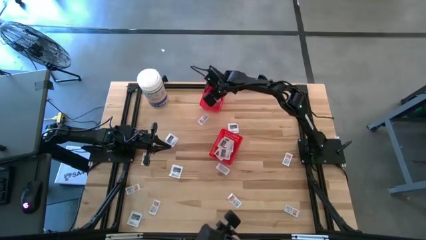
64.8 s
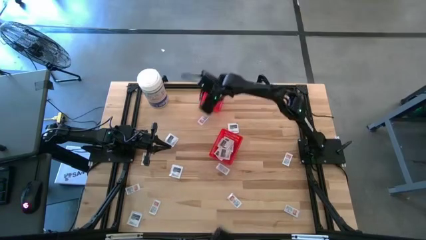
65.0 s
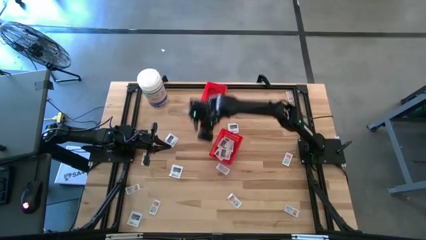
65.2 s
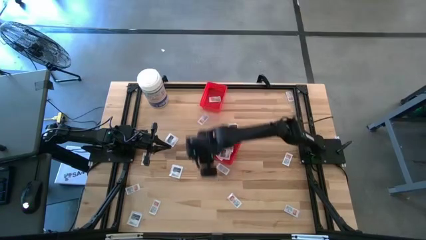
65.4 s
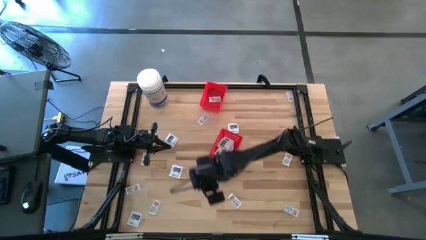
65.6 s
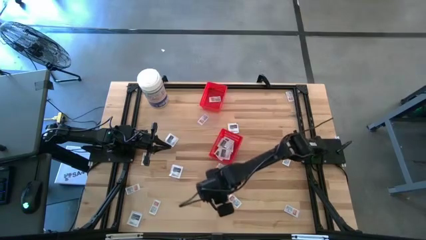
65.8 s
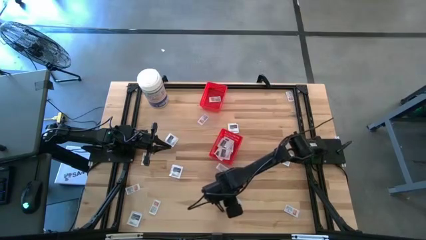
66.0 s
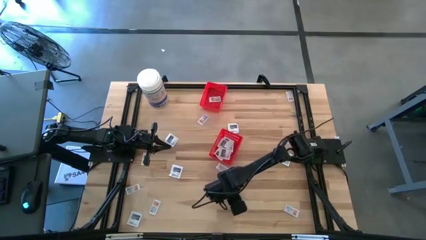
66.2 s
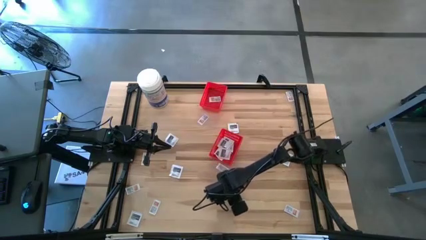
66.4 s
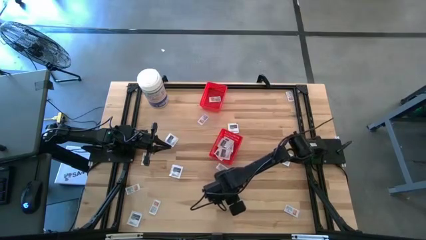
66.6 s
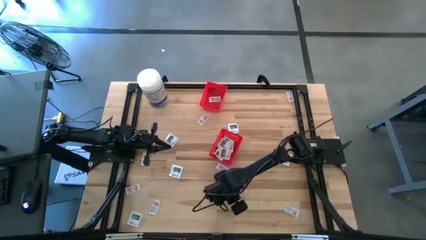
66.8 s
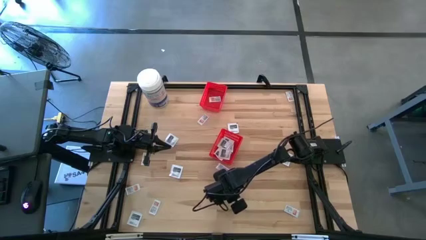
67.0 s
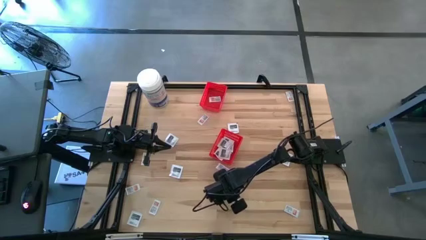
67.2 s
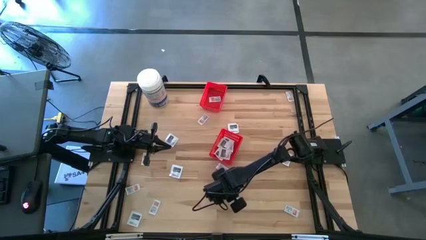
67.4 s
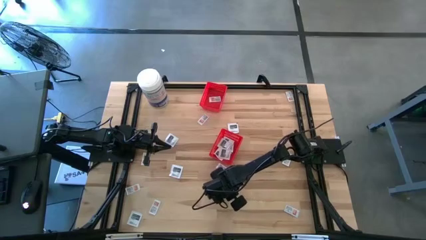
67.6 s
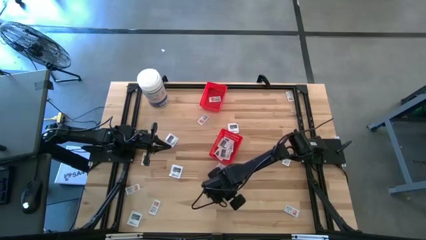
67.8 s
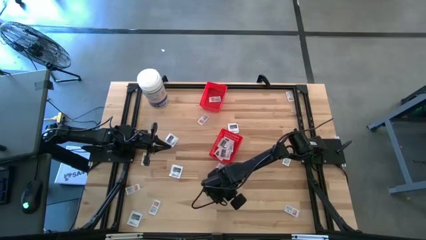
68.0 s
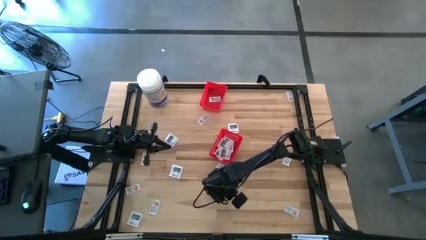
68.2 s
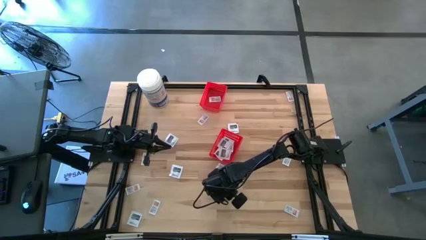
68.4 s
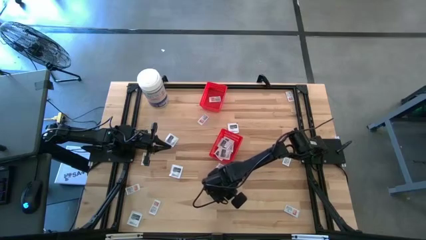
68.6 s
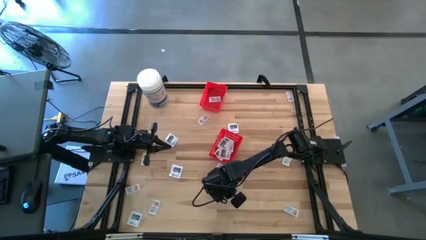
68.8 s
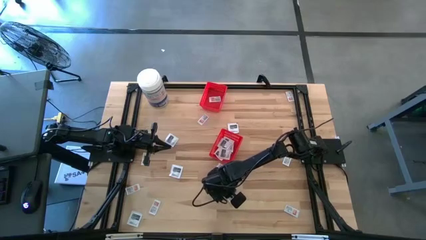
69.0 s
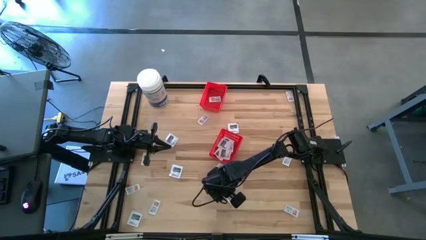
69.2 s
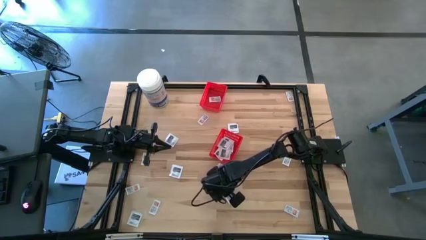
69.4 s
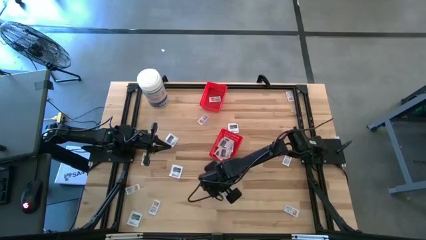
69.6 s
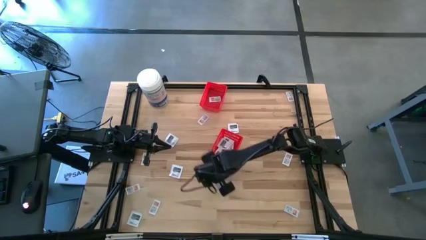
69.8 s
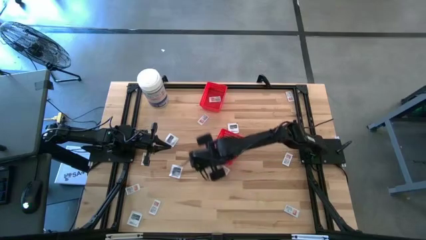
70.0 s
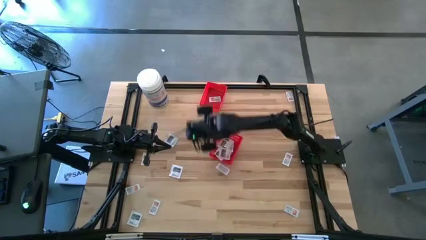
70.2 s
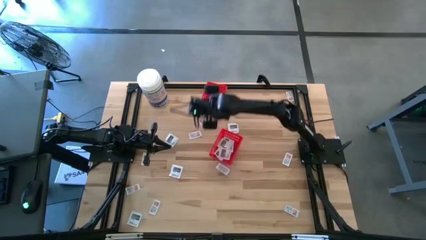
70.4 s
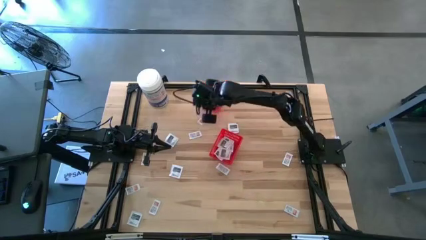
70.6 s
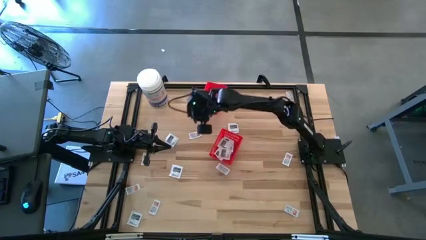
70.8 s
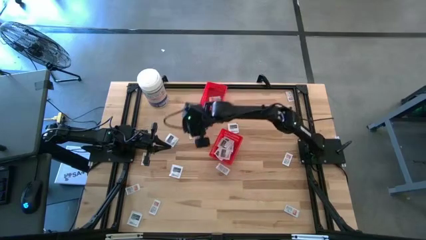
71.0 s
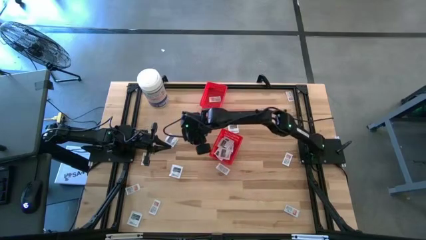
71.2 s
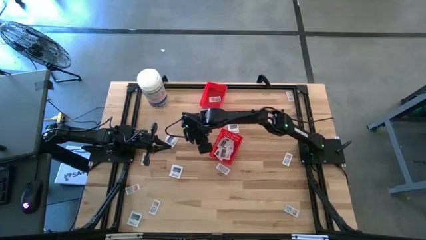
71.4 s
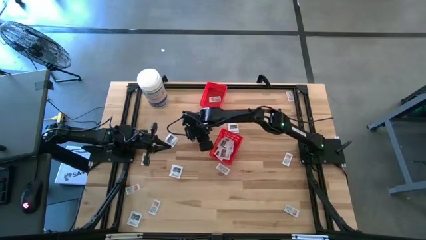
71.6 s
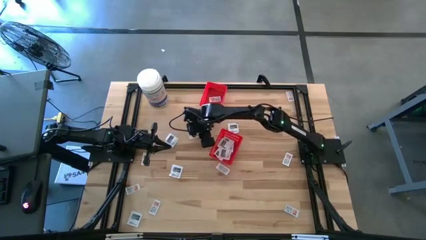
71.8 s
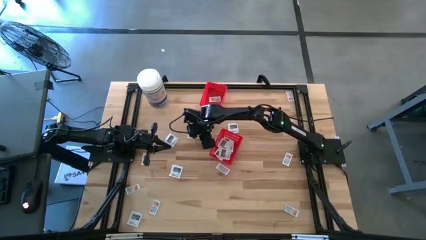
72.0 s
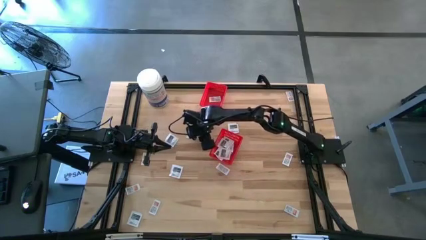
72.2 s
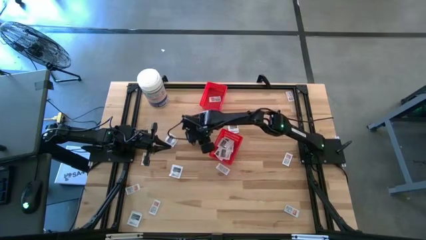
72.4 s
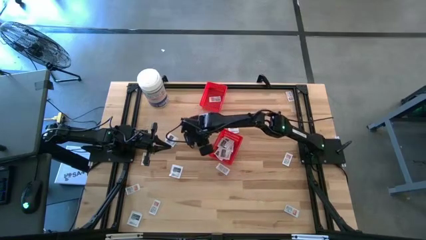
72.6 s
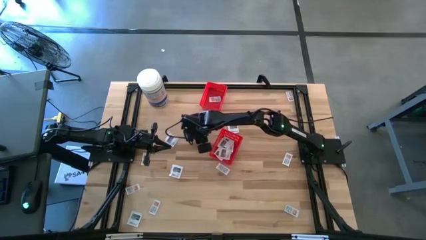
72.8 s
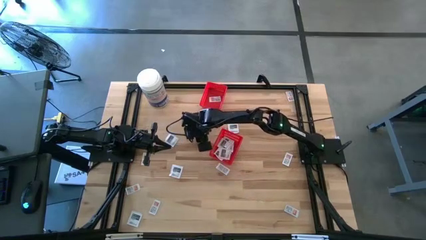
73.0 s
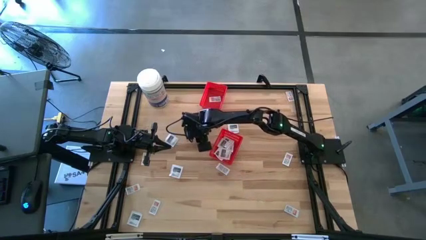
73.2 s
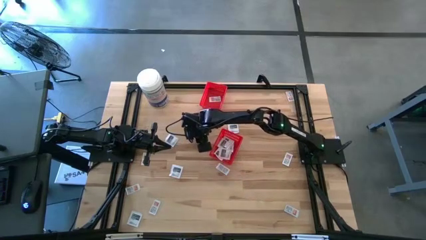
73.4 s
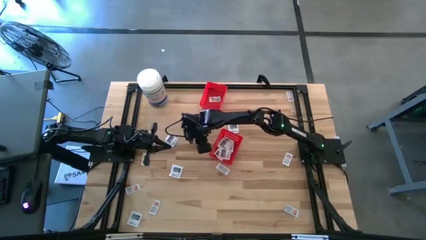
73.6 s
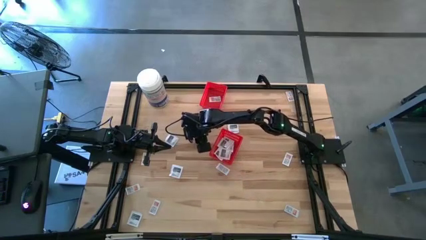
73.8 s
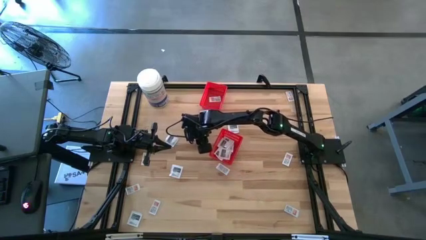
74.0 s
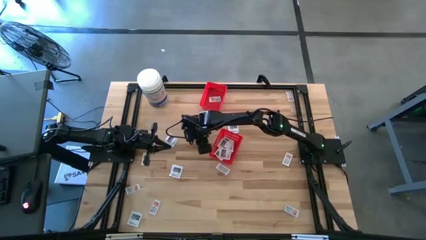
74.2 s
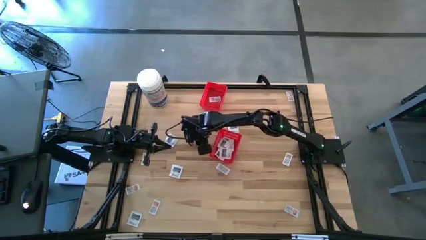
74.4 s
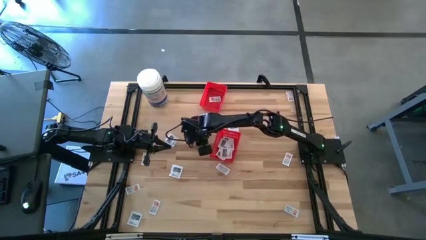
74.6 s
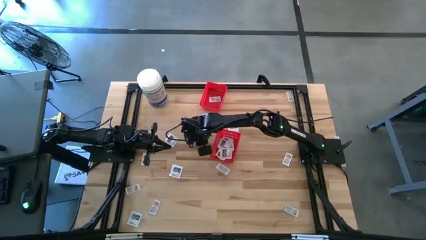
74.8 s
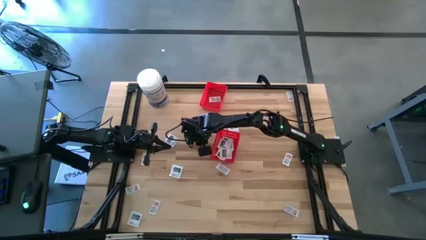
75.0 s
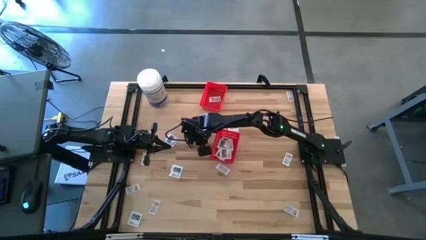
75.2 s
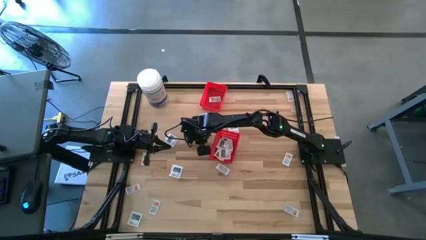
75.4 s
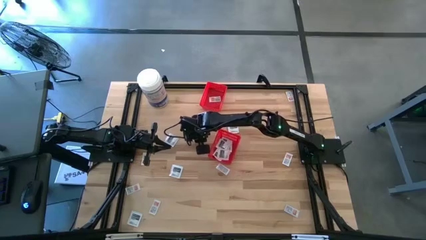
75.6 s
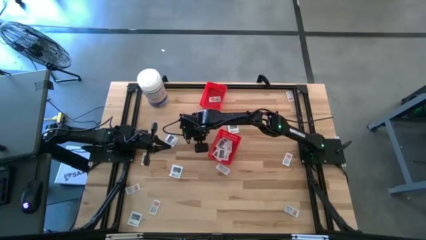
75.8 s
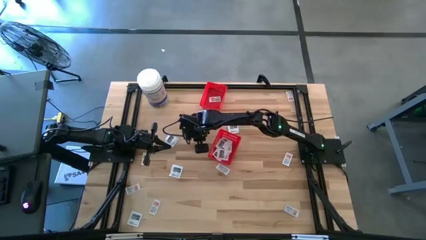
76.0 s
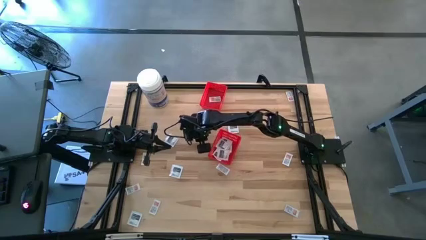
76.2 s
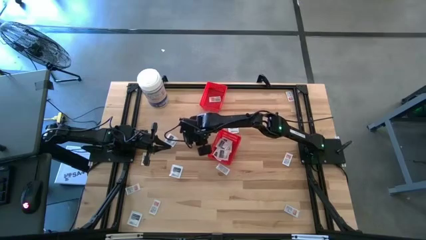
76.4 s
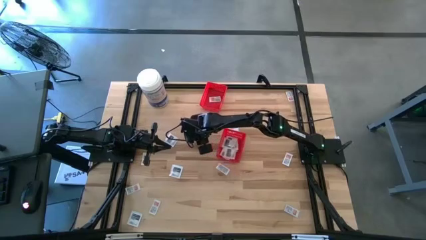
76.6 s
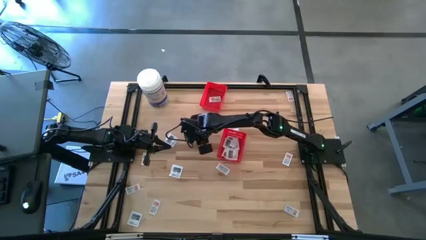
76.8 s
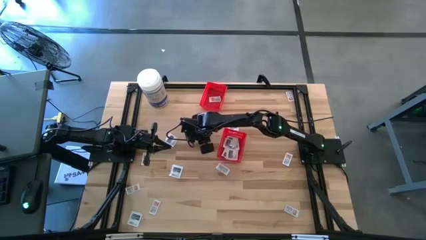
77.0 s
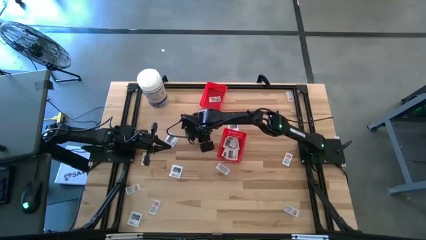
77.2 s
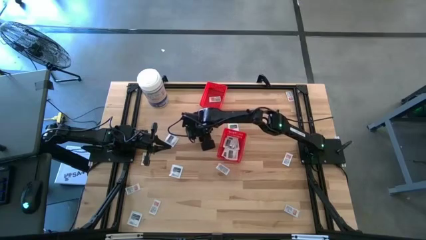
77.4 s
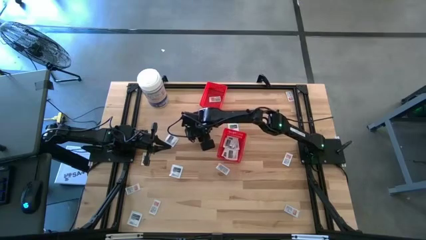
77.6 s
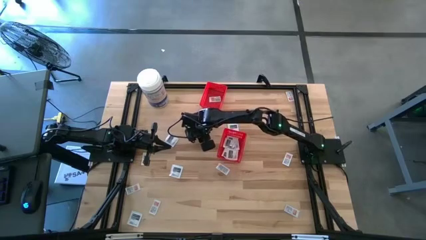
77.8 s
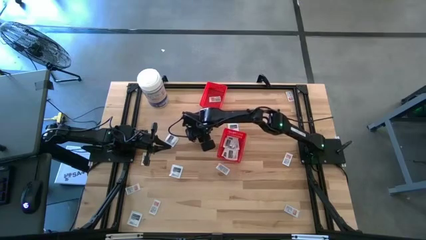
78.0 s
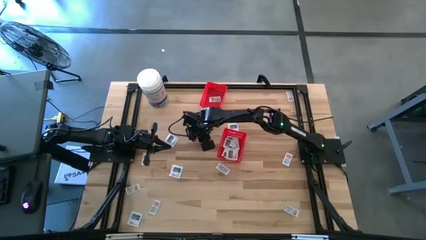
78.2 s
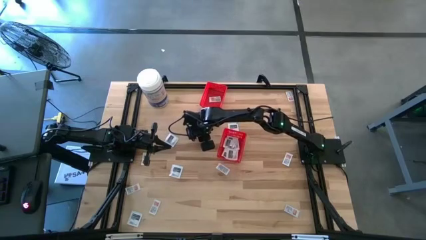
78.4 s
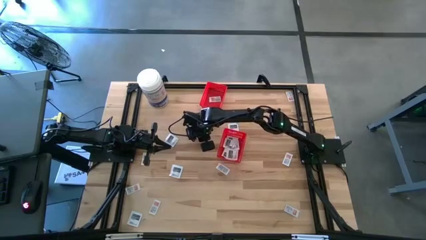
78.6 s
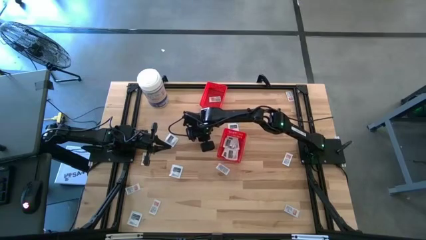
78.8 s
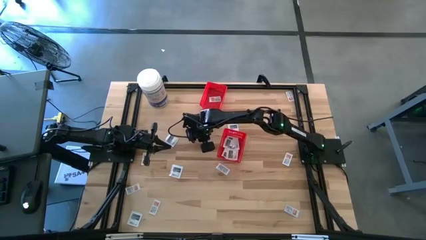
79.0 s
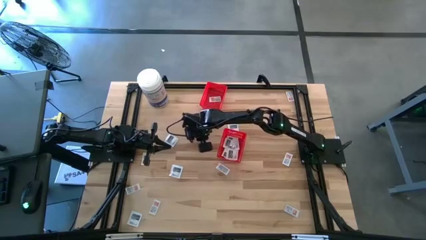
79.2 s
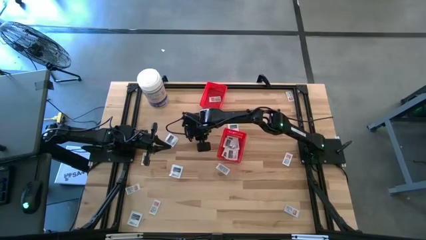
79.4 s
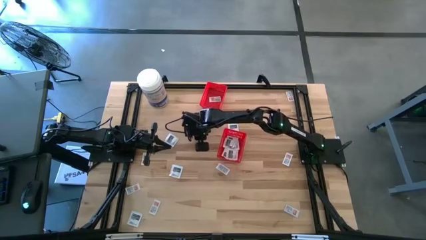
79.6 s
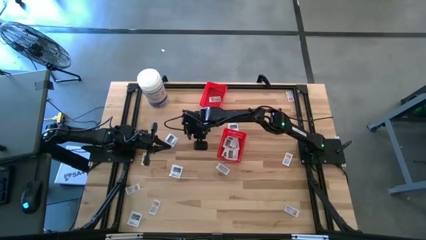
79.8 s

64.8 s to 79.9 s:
Task: Pick & Place First Aid Supplies
Put the white ointment pack into the top red bin
